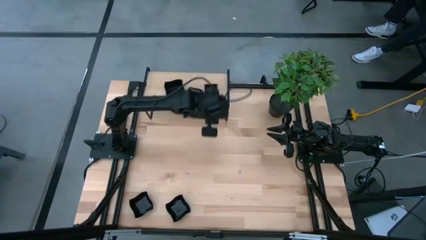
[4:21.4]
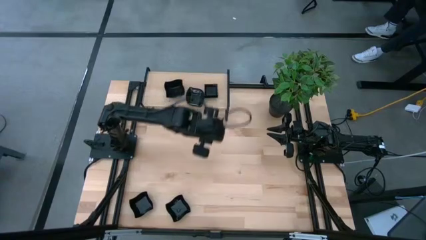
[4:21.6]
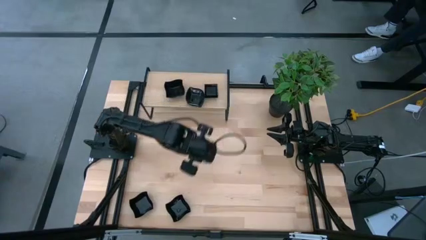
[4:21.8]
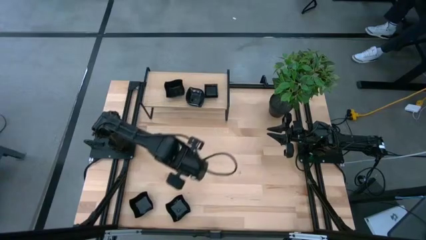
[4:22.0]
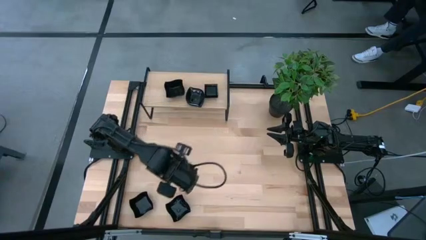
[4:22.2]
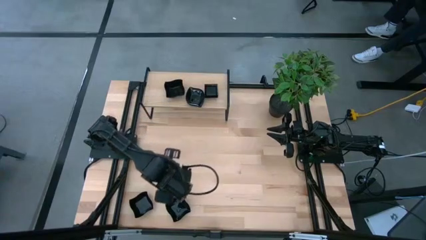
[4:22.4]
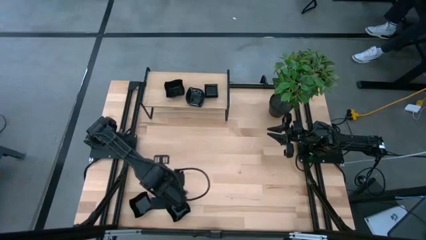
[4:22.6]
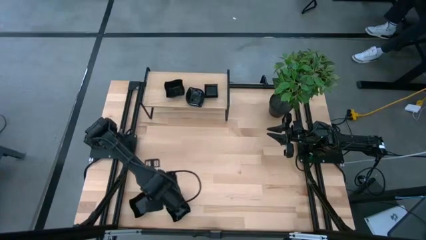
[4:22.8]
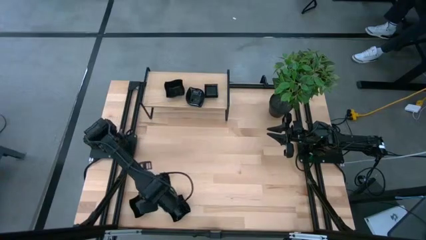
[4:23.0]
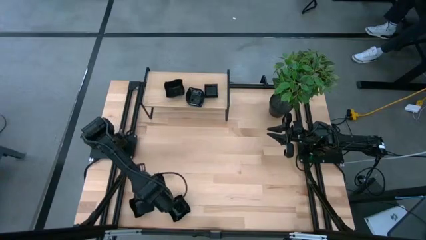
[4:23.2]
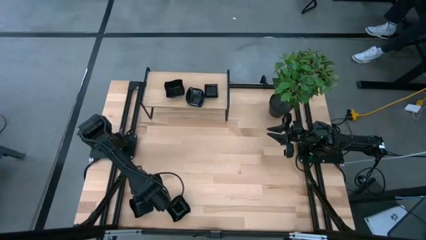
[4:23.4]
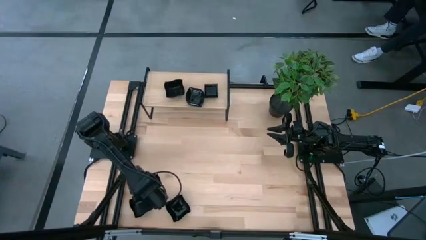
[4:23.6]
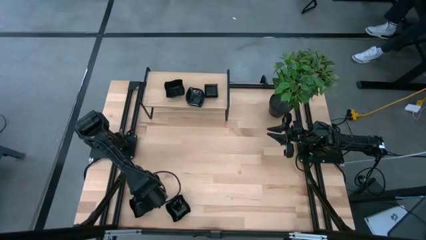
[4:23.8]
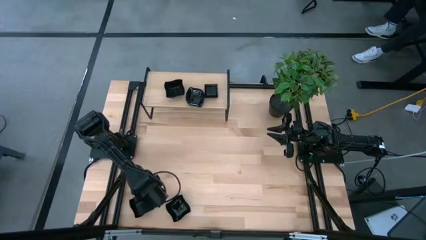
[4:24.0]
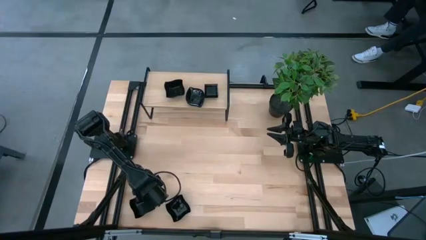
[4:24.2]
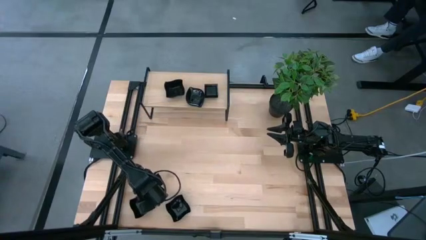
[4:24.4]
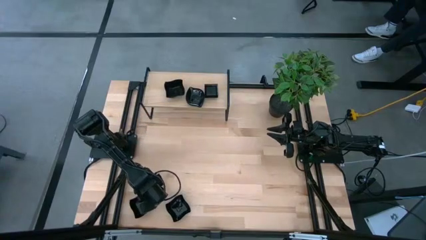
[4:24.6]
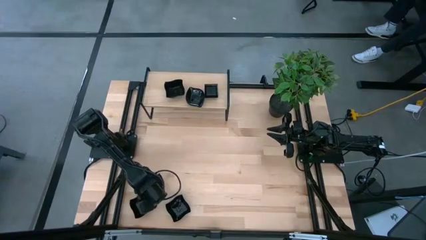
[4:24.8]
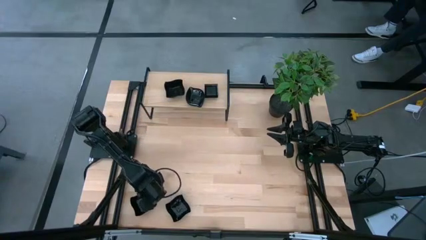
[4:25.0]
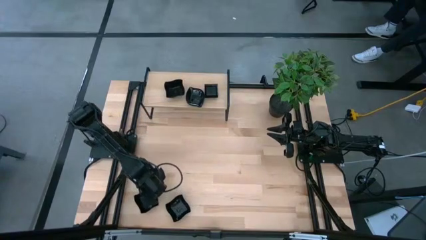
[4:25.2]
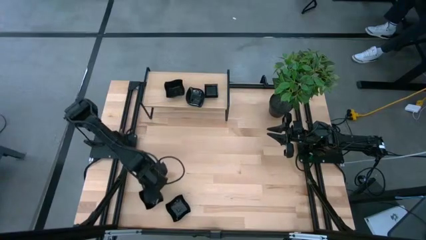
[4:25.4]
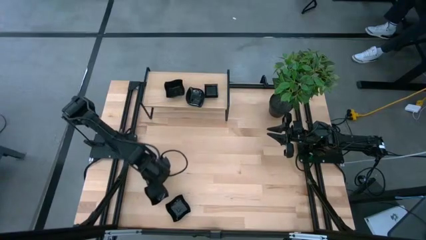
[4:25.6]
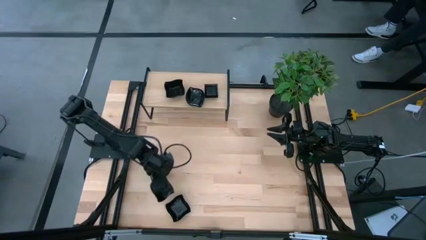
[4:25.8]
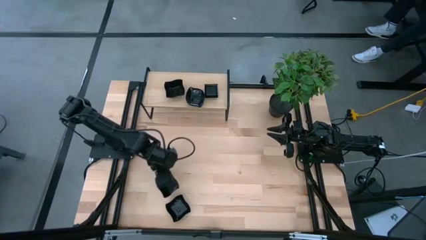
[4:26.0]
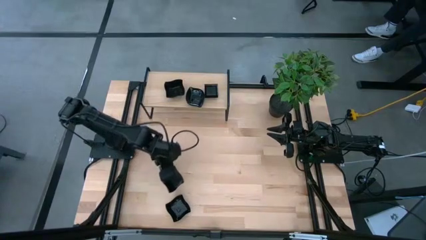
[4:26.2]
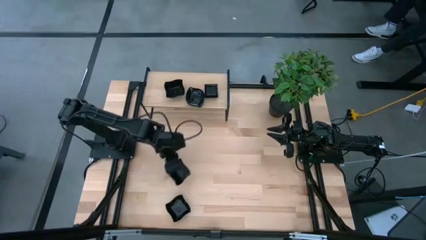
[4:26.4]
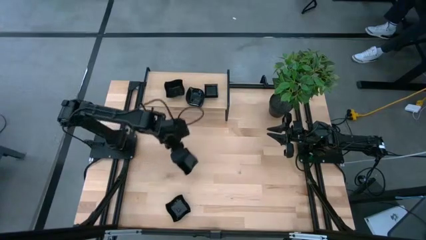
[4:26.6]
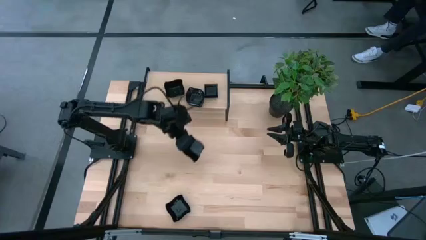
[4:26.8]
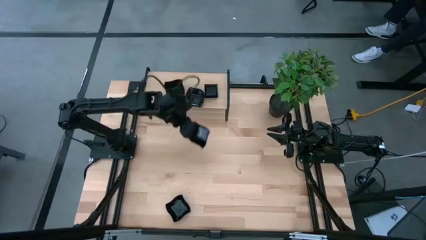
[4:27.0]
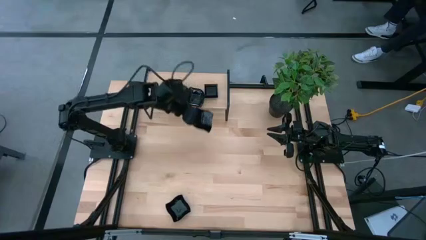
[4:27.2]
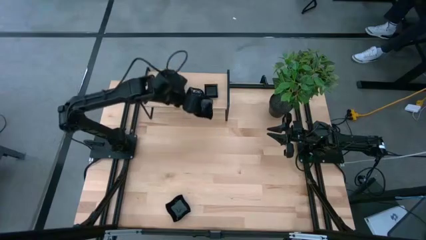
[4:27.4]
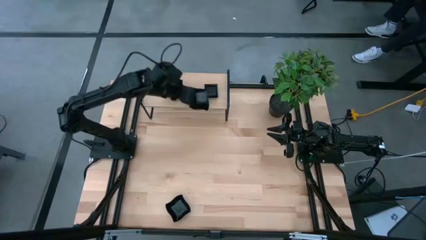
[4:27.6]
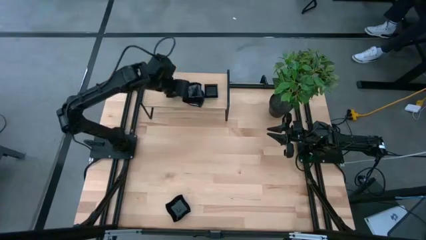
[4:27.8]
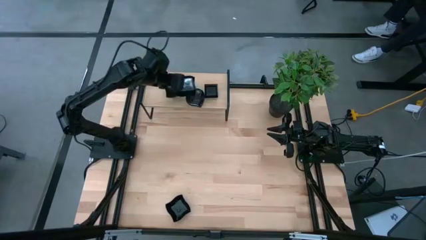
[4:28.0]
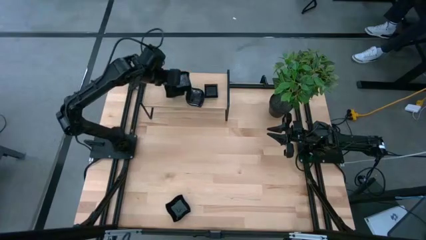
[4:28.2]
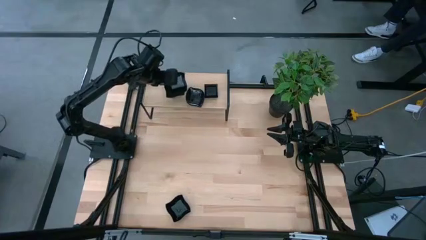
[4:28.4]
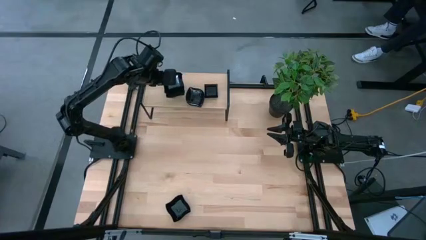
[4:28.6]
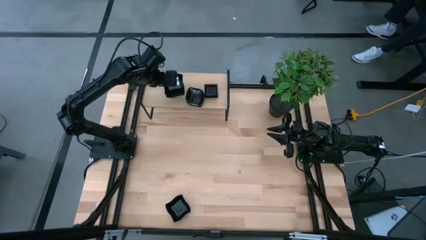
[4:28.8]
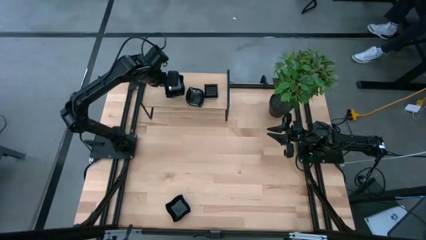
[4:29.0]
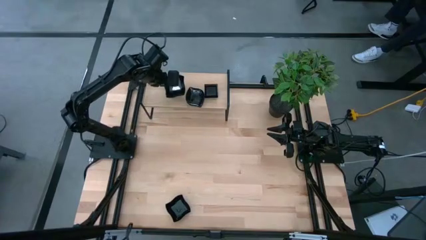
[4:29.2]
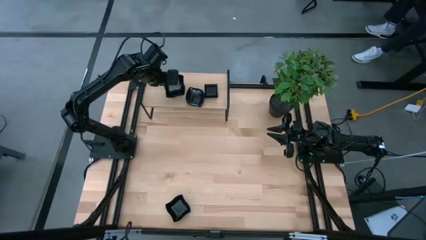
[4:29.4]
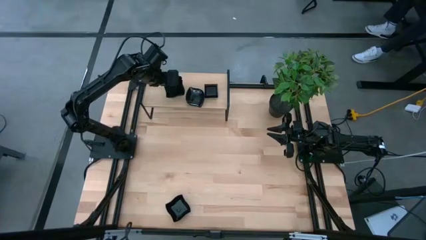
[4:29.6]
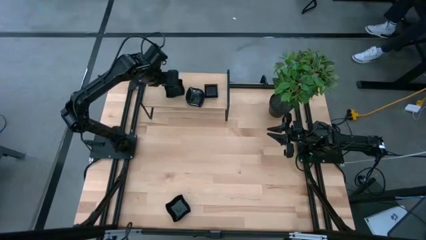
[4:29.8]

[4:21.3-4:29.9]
Task: Pick & Place Mini shaped plates
Stack the distorted square plate on top of the distorted square plates on the shelf

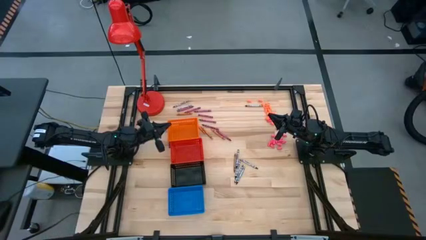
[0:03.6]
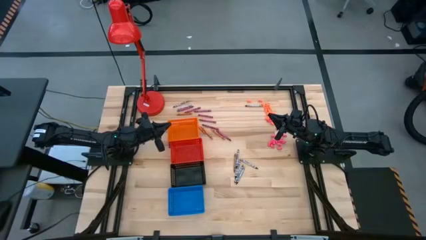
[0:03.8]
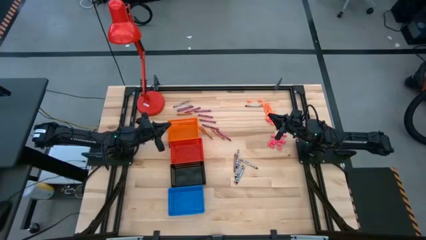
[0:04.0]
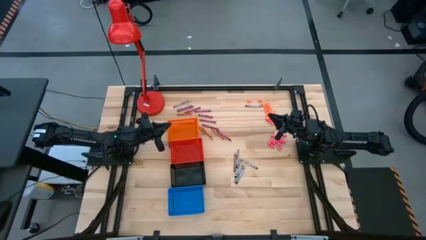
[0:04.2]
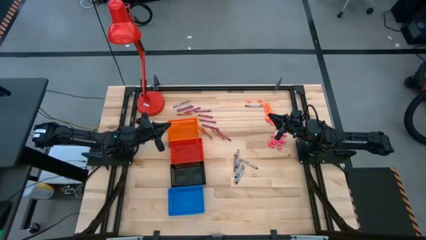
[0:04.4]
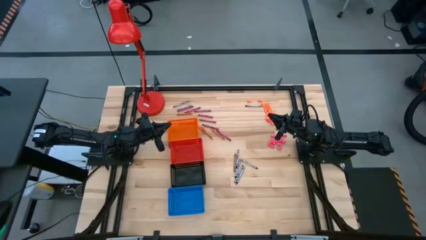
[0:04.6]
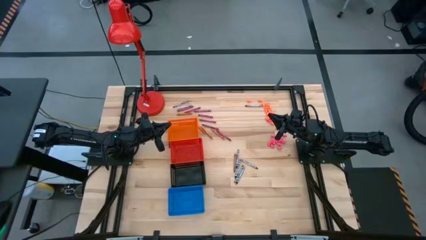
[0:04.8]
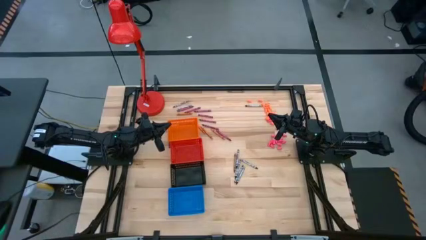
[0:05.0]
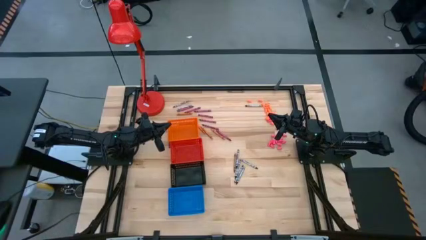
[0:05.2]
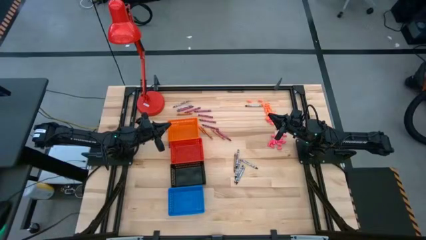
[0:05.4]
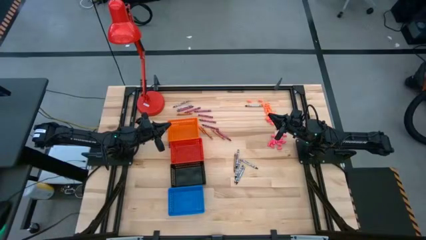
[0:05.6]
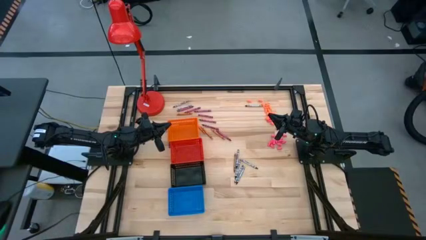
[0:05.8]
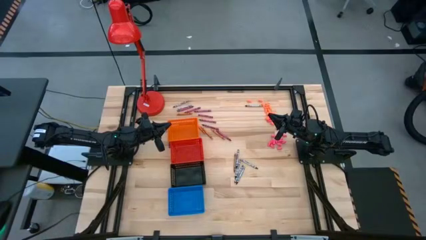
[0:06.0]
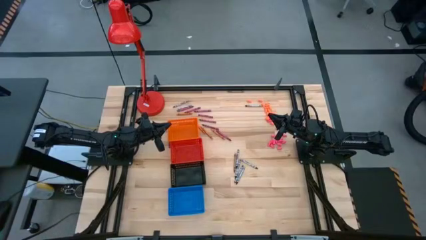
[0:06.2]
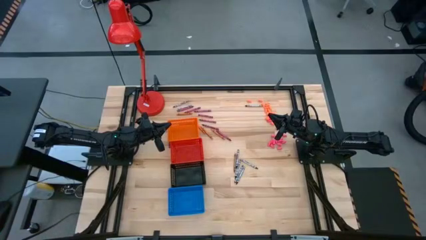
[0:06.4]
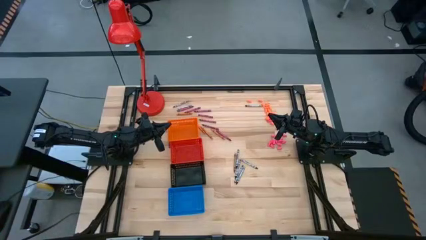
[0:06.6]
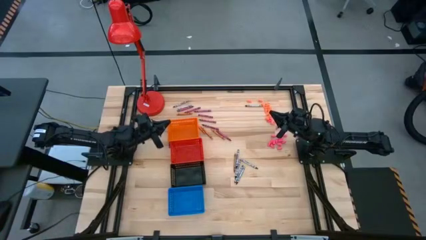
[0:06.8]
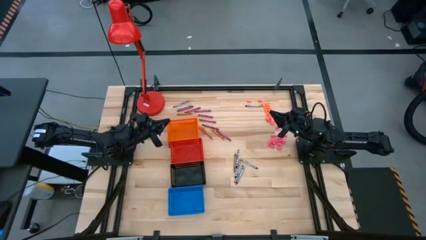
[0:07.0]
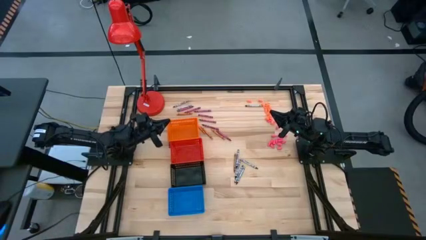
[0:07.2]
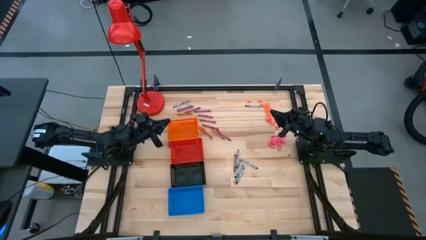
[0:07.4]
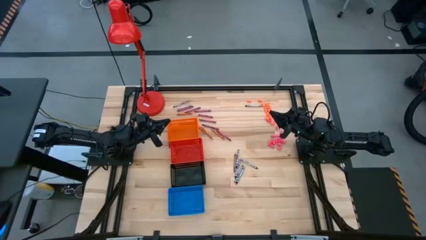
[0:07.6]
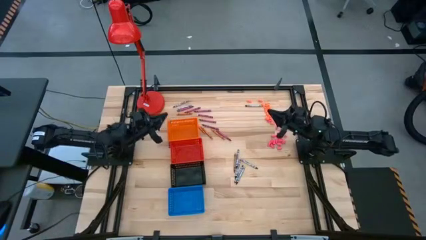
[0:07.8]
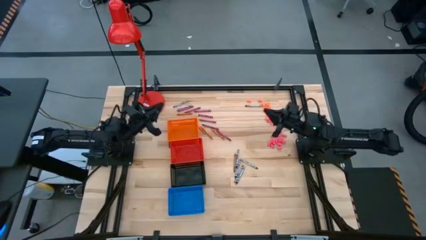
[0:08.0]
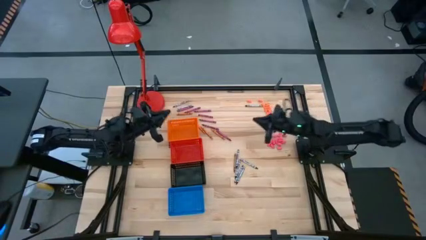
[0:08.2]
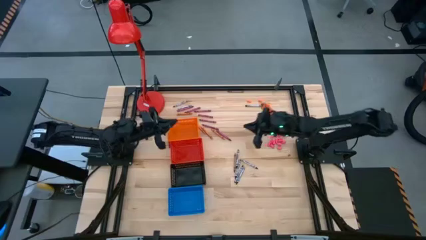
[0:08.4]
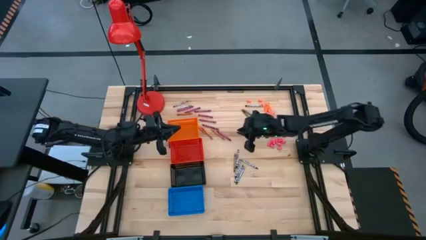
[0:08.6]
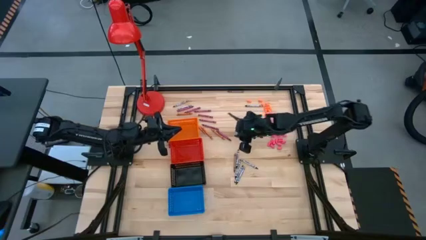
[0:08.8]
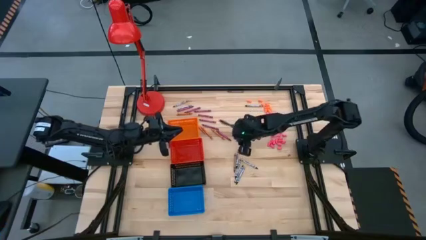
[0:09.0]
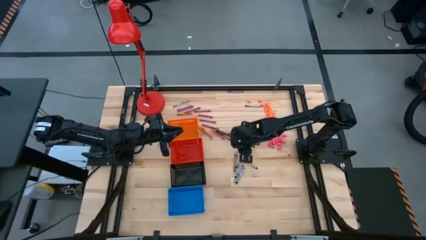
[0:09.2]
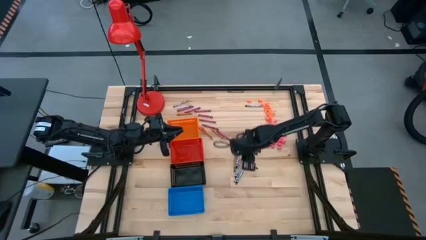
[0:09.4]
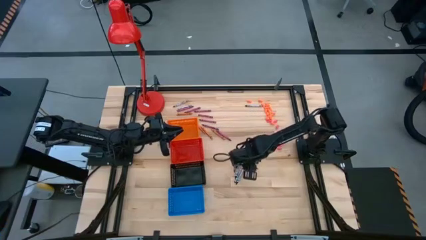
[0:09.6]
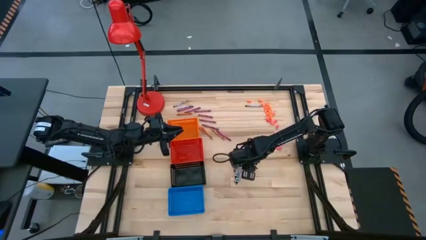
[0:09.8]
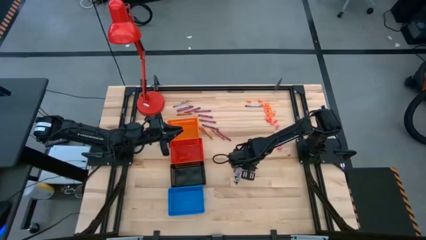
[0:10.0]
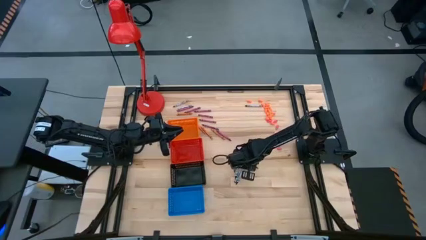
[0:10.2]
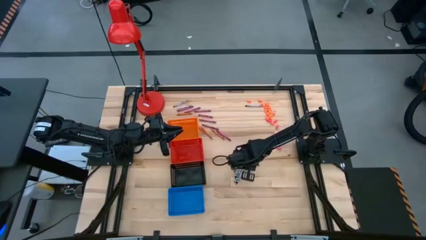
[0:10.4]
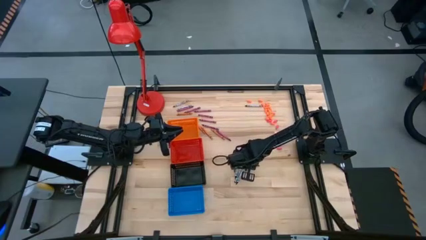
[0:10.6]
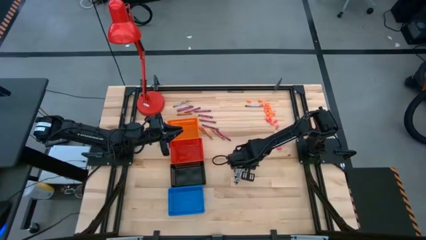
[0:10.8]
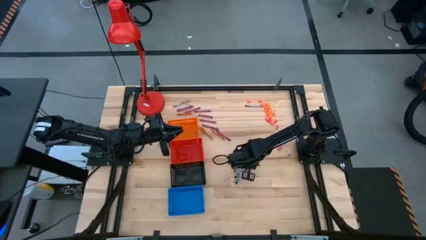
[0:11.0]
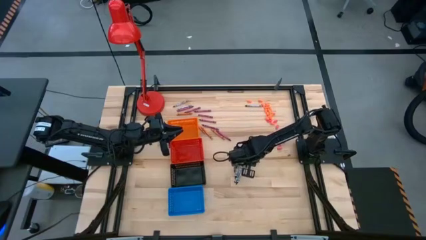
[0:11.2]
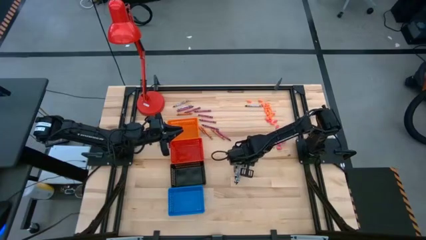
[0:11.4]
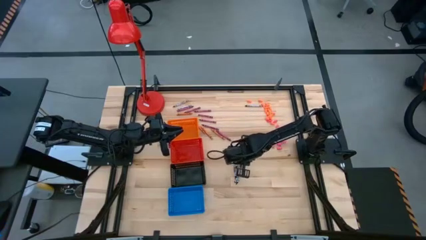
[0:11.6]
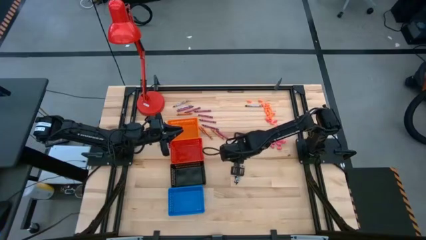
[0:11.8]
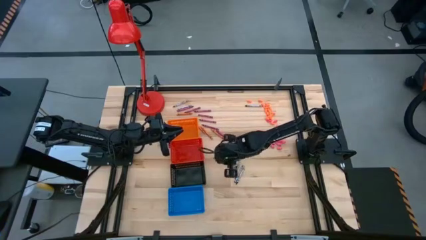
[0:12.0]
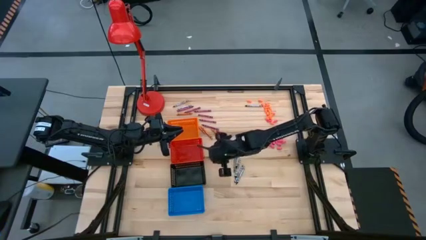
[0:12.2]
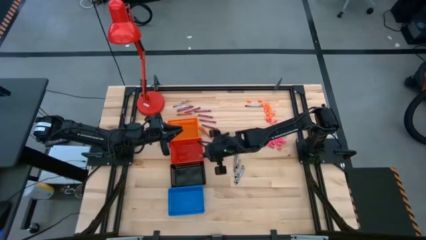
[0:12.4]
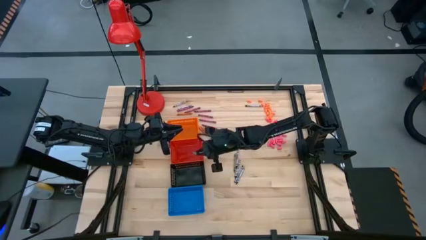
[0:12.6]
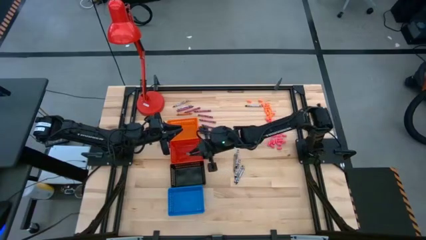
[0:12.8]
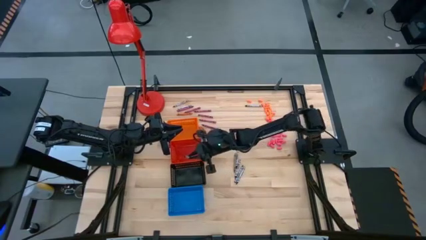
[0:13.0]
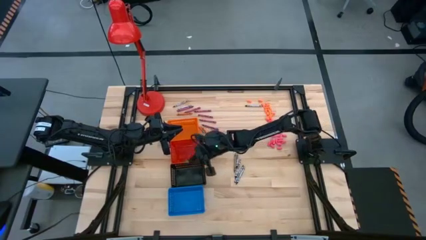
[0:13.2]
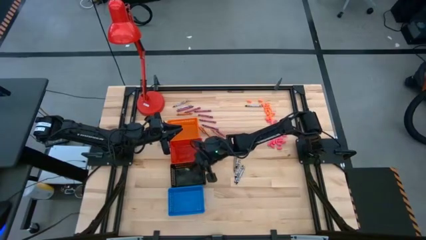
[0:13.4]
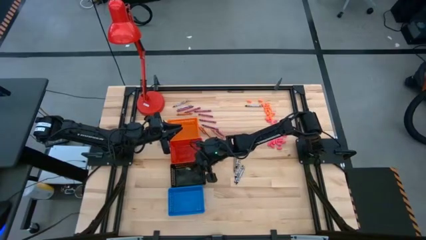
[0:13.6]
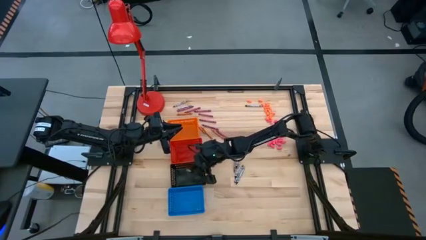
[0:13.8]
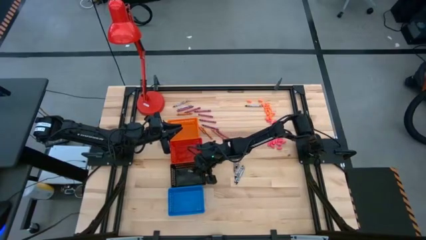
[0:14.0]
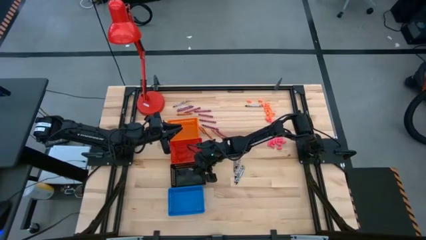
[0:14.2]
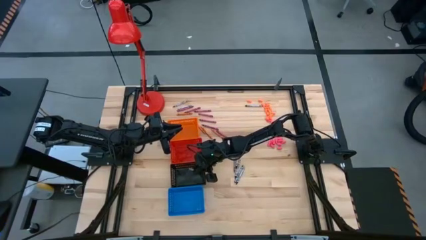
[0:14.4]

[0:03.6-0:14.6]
Task: Sort crayons
Put the black crayon into the black basket
